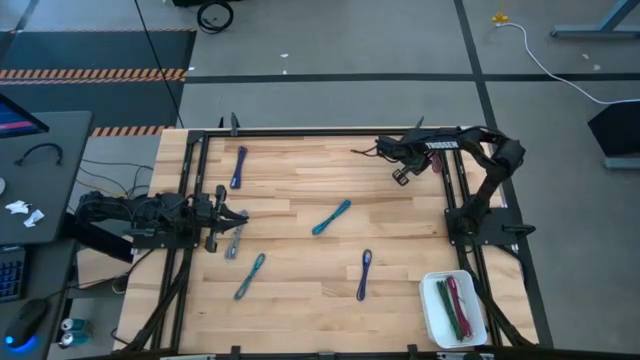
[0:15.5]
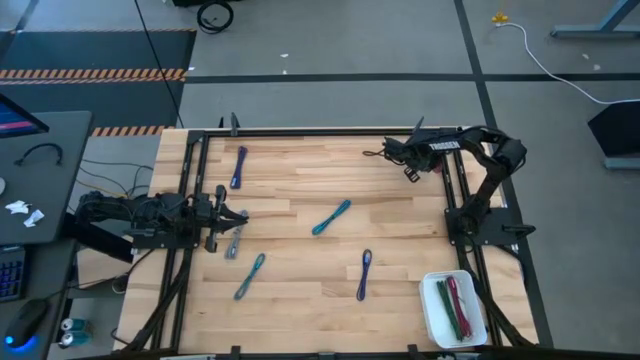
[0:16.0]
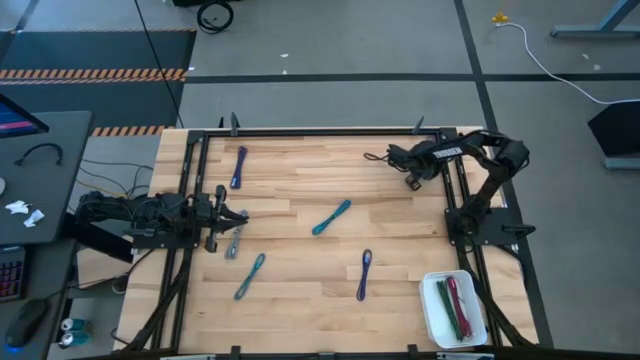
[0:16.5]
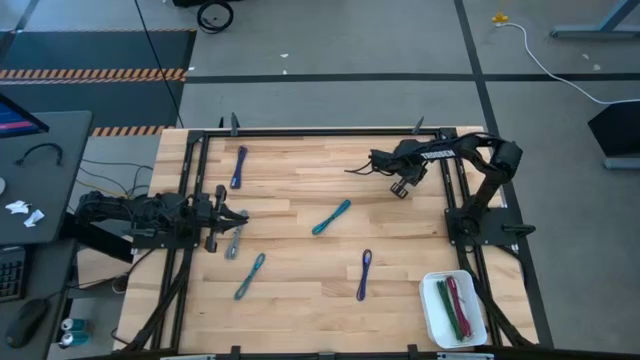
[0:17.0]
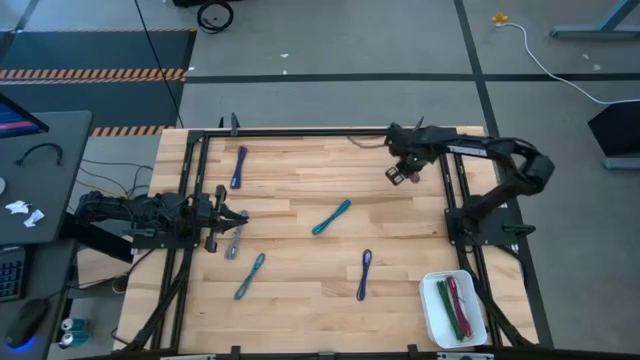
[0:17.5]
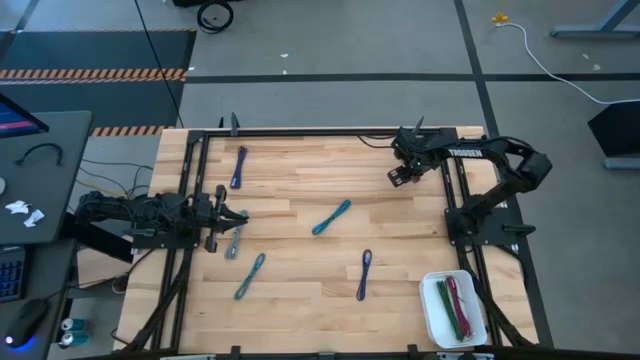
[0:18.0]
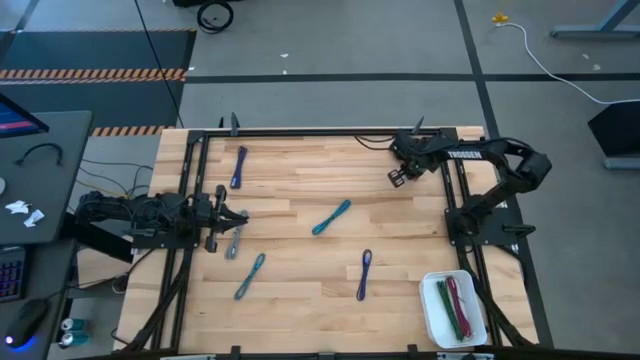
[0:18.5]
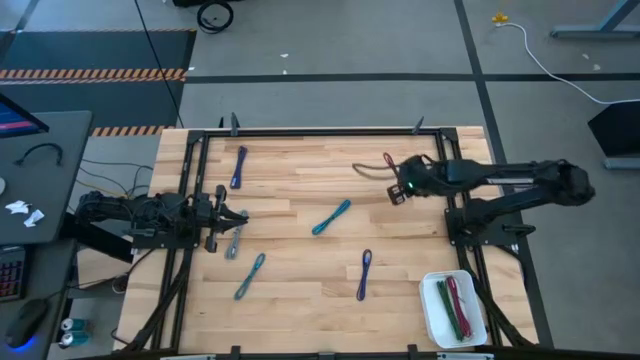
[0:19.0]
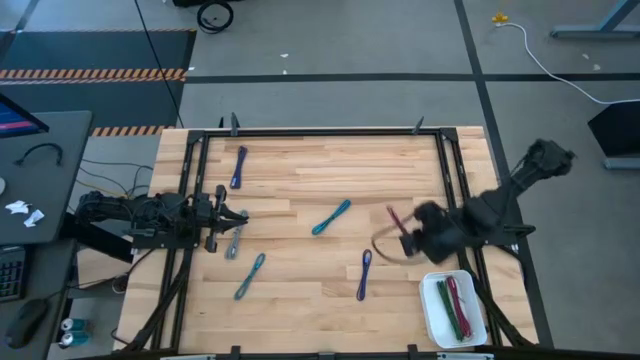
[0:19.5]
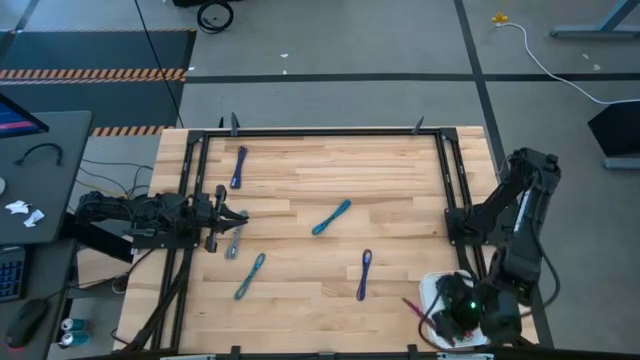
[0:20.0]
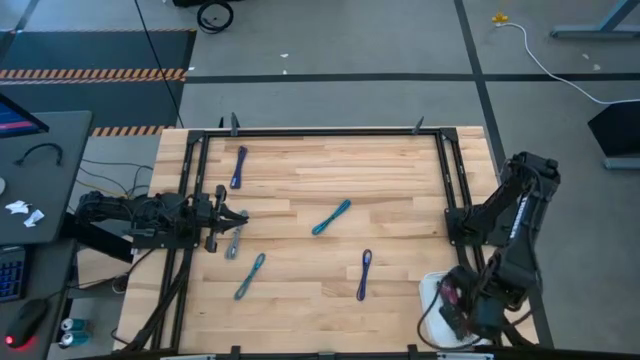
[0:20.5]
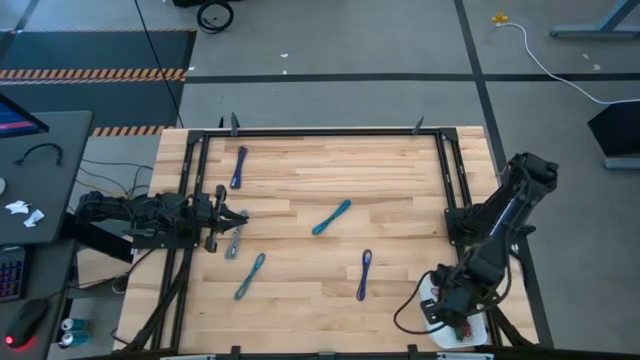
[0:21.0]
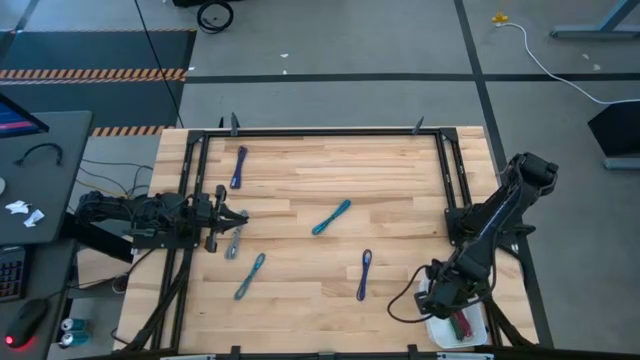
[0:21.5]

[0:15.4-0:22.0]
Task: Pick and place USB-C Cables
Put the pink charger cable into the white bin

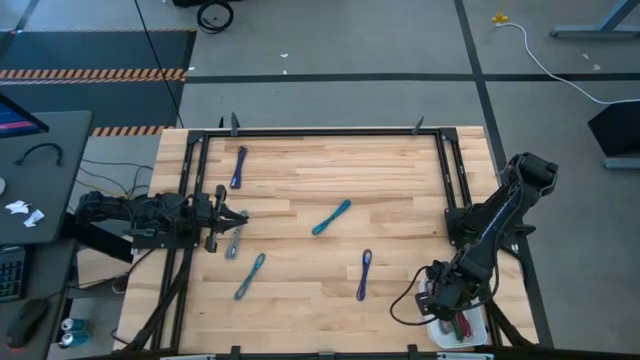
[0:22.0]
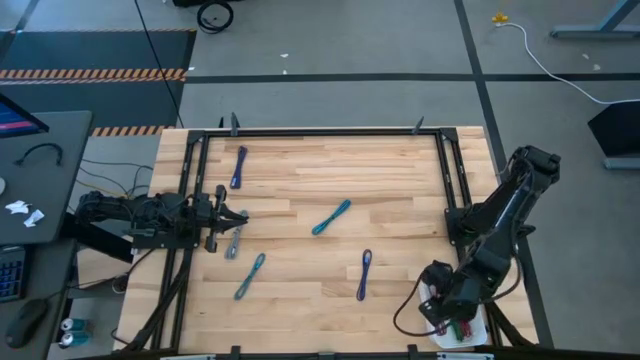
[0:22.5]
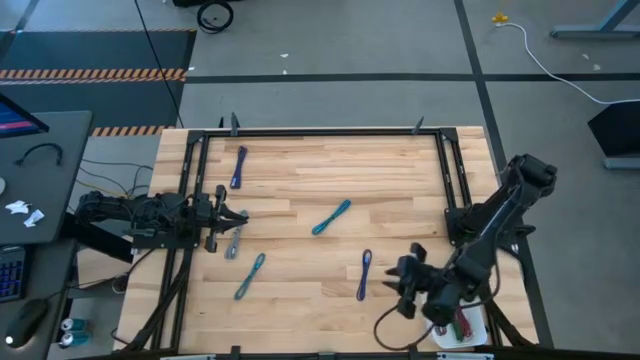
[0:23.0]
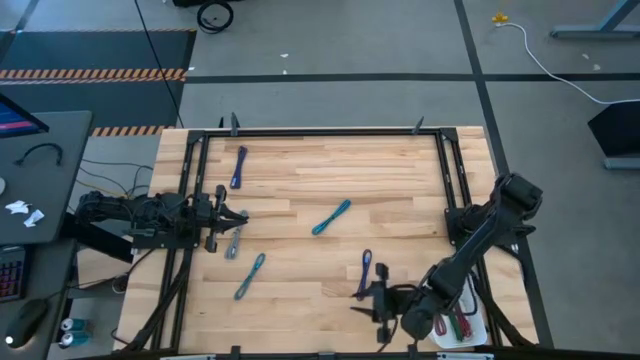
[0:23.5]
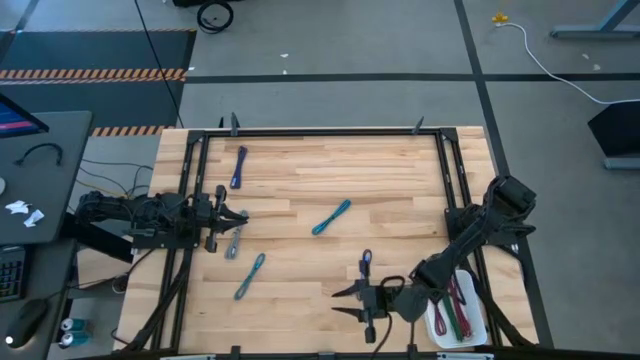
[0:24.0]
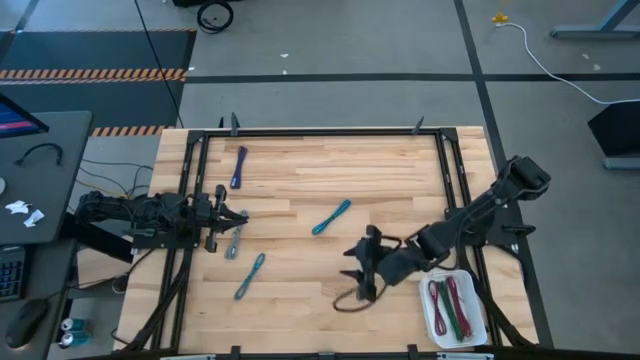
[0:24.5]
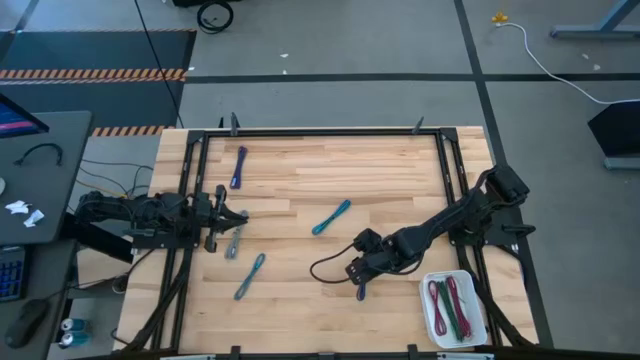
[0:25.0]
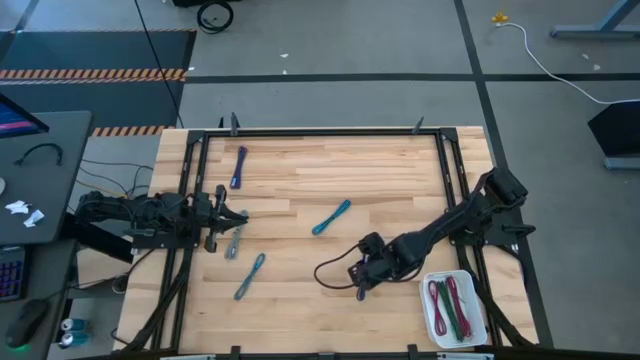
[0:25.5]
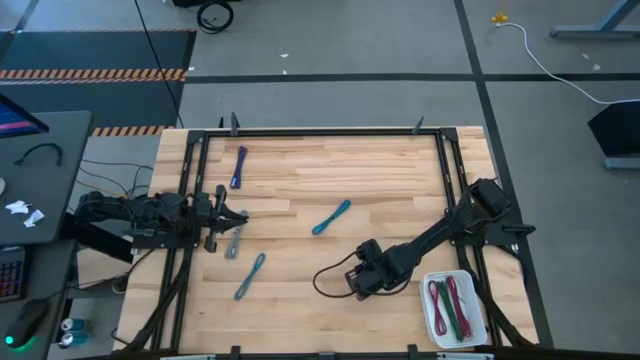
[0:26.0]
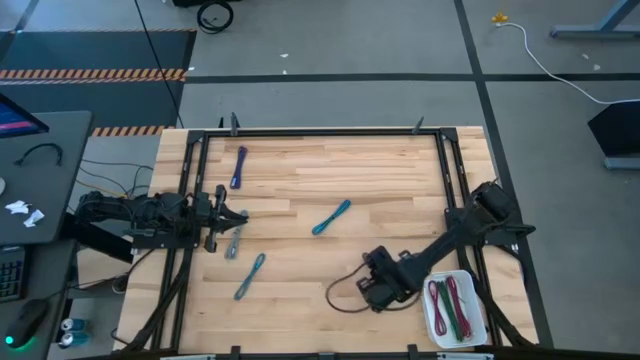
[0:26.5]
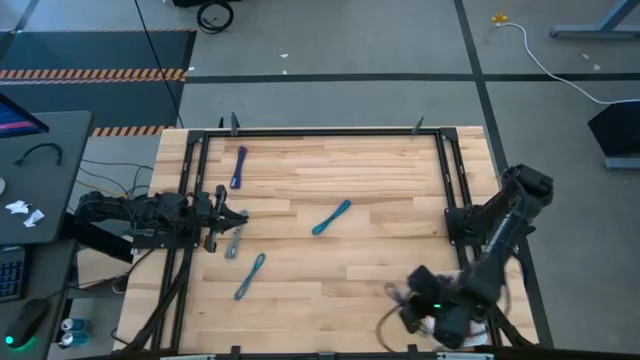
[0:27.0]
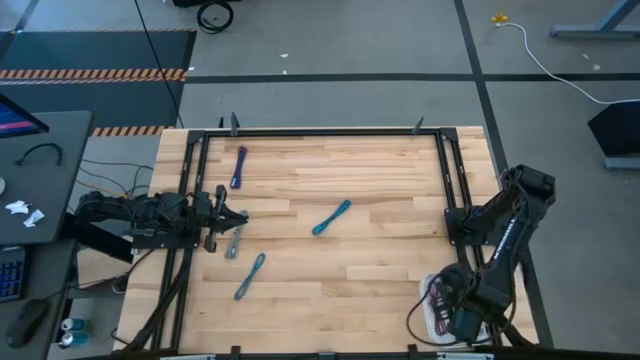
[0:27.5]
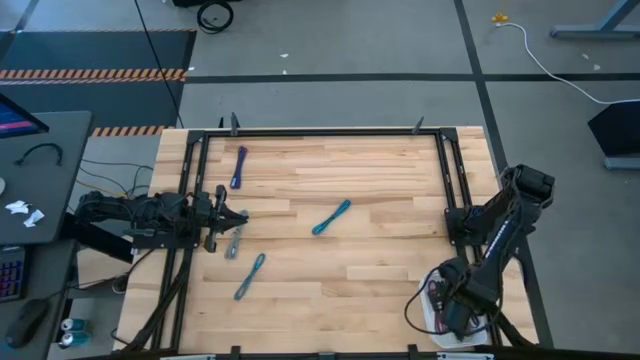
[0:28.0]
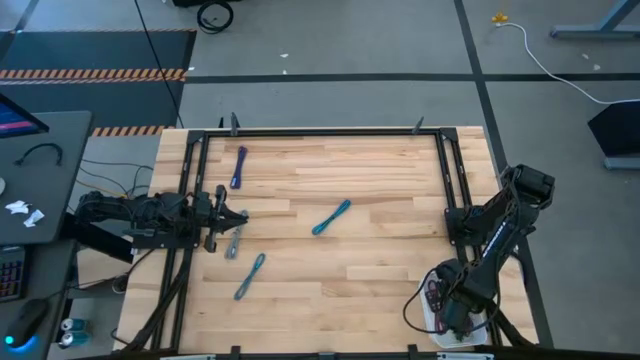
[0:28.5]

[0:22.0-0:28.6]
Put the bottom violet charger cable into the white bin

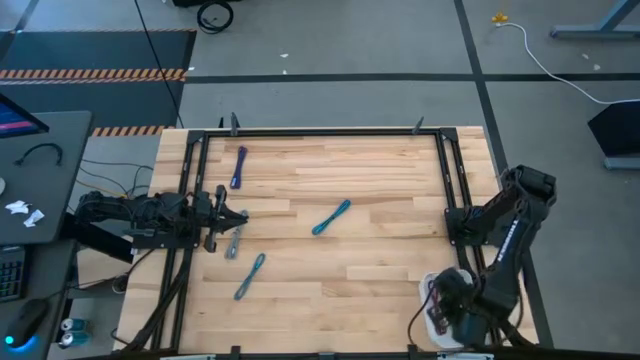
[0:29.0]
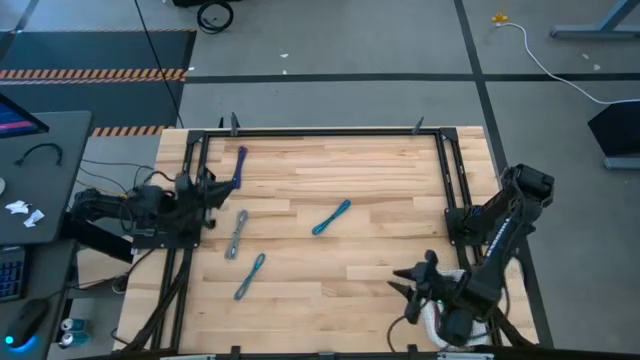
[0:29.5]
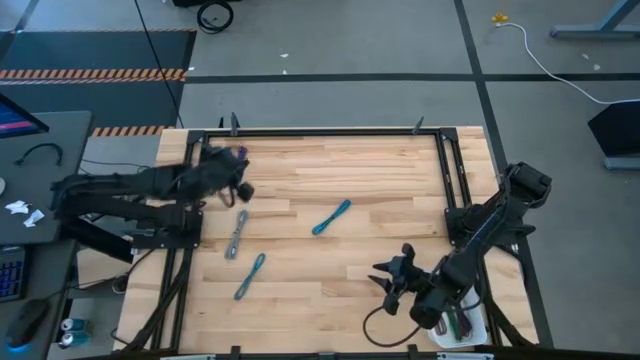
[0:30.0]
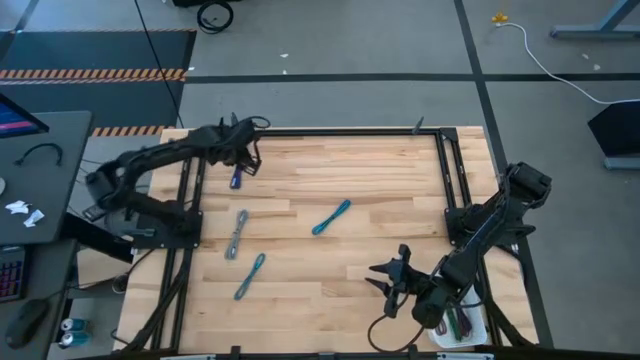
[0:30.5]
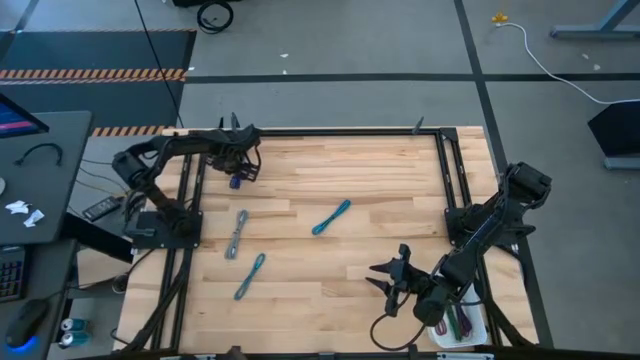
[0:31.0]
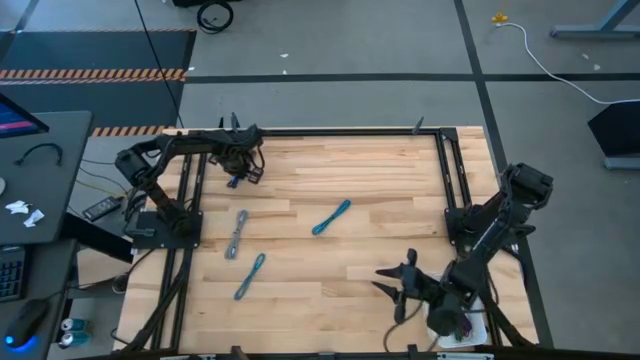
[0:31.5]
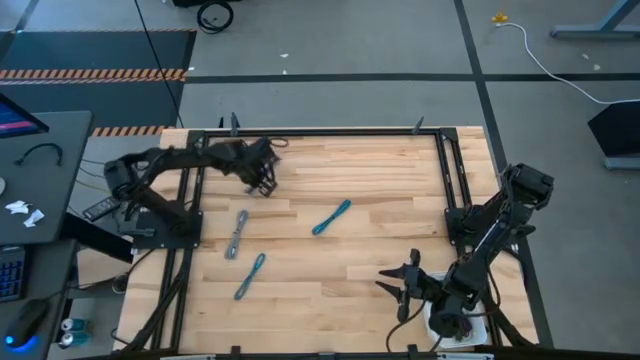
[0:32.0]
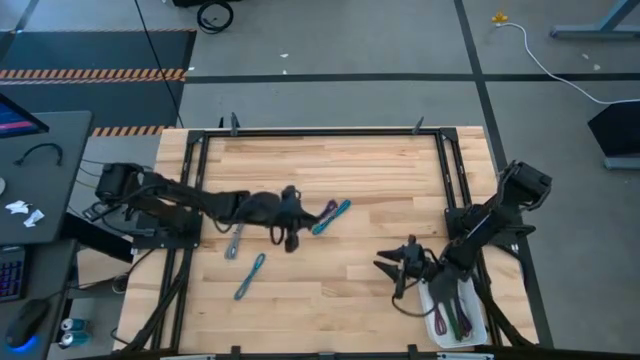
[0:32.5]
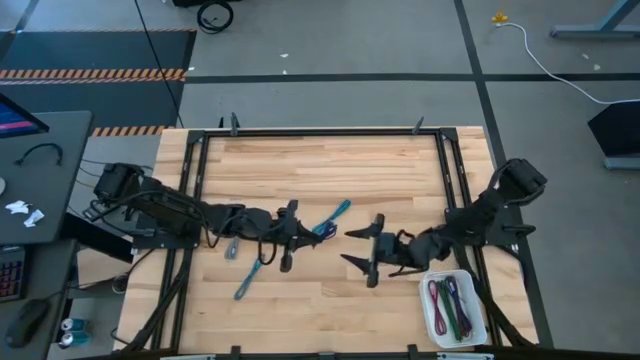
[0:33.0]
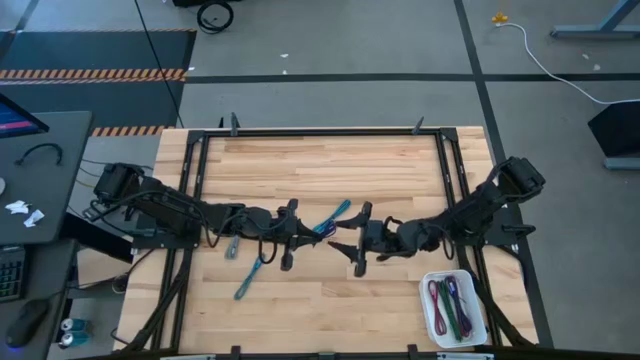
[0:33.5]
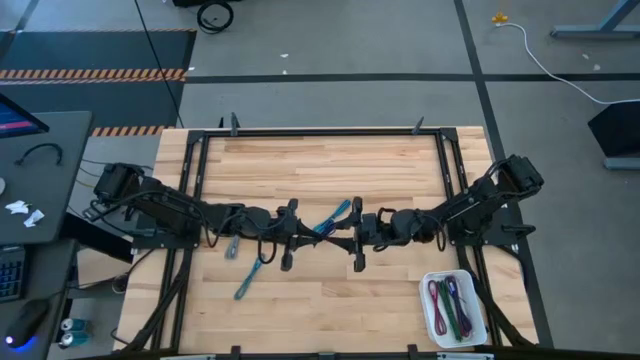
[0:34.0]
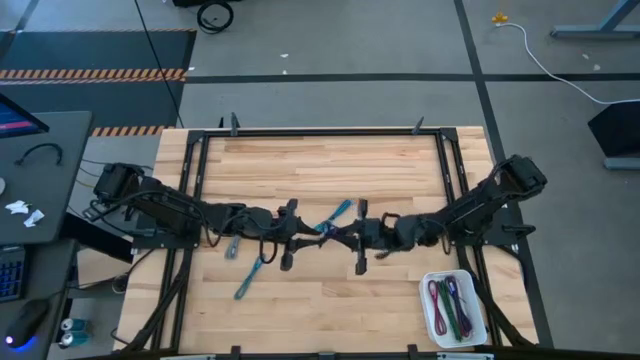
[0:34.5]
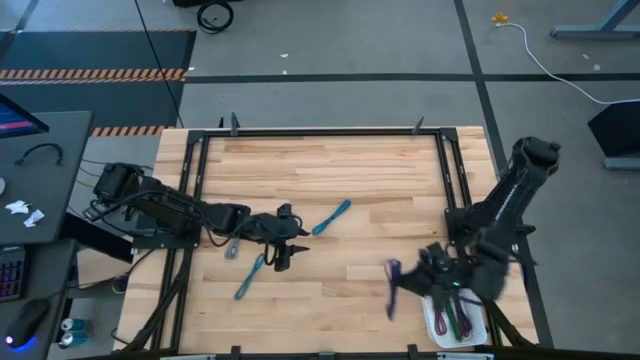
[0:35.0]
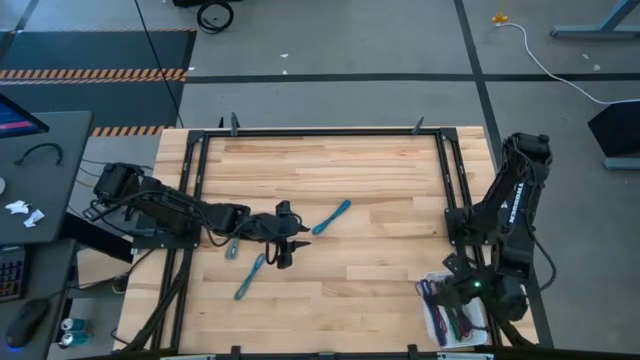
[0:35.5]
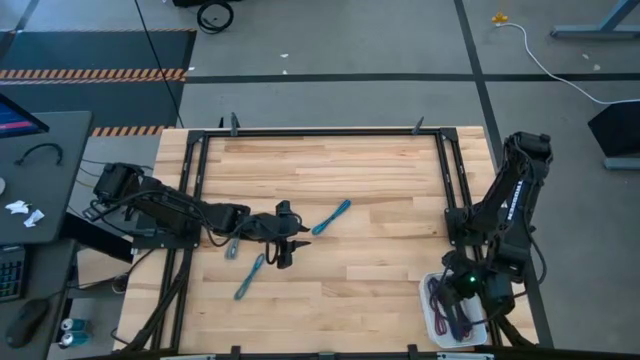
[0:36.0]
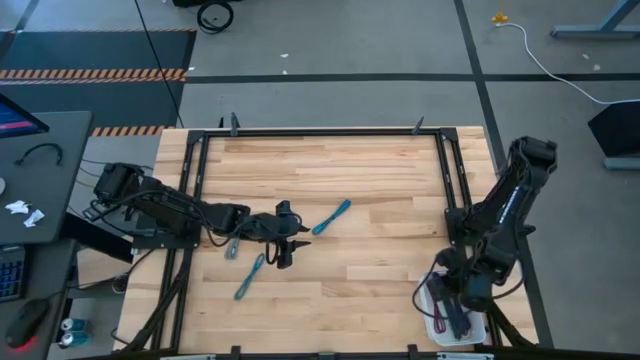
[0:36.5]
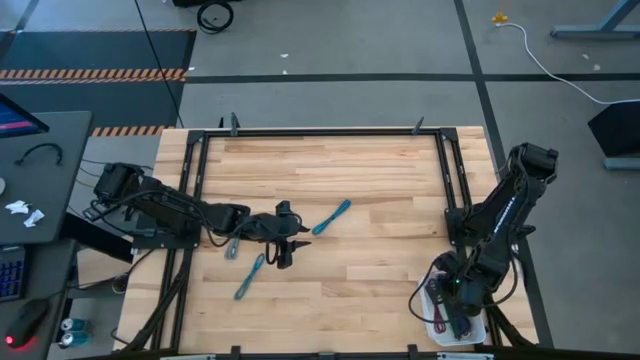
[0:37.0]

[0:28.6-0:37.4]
Put the violet charger cable into the white bin
